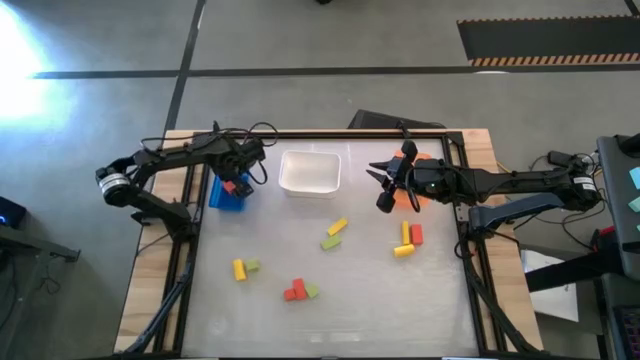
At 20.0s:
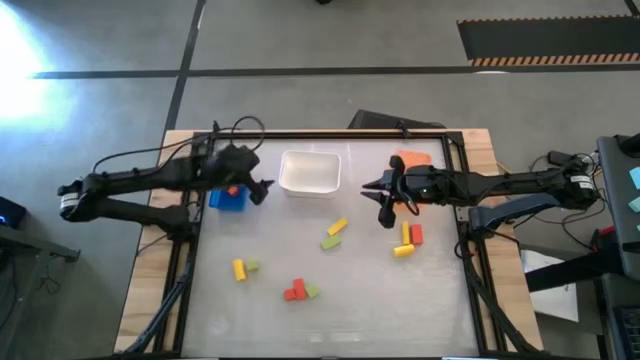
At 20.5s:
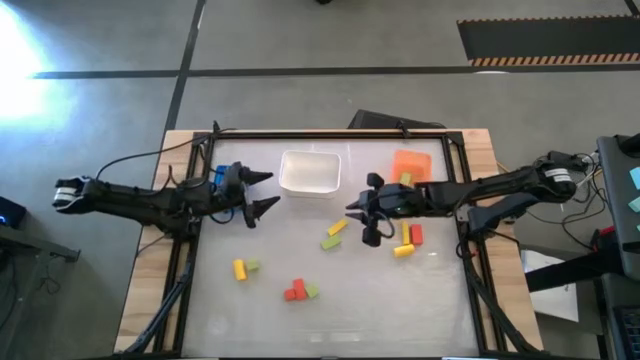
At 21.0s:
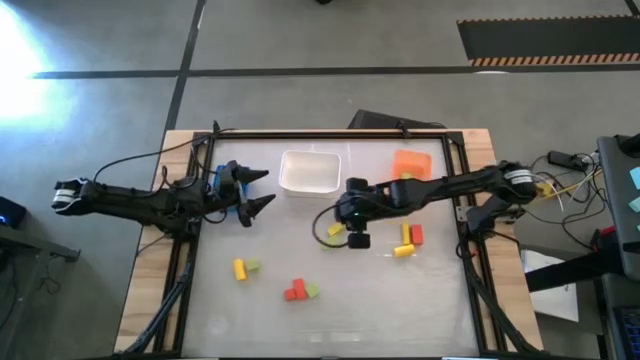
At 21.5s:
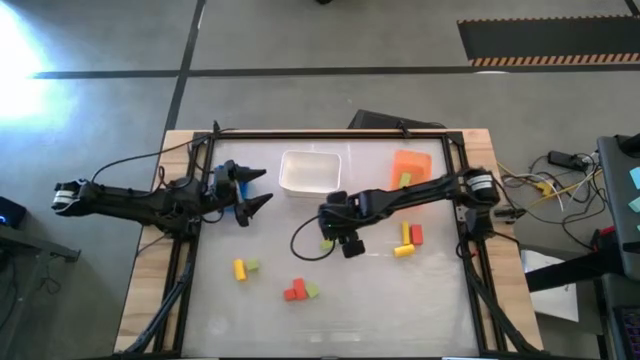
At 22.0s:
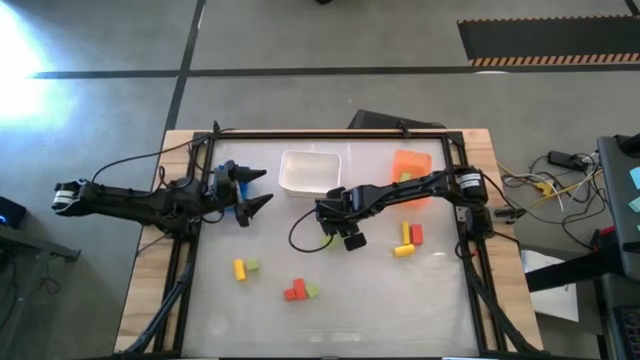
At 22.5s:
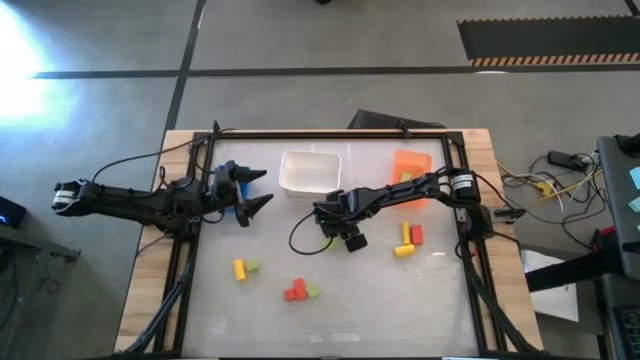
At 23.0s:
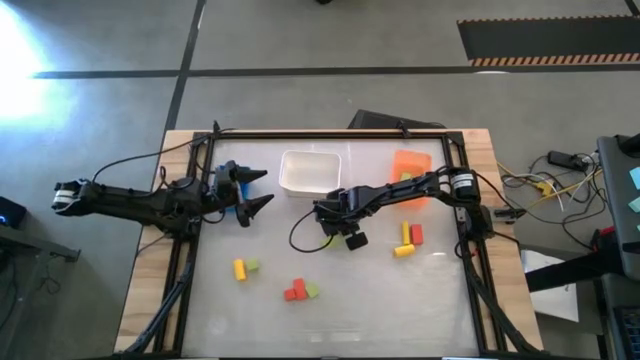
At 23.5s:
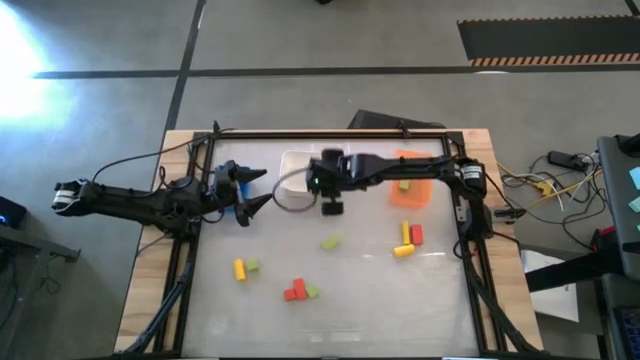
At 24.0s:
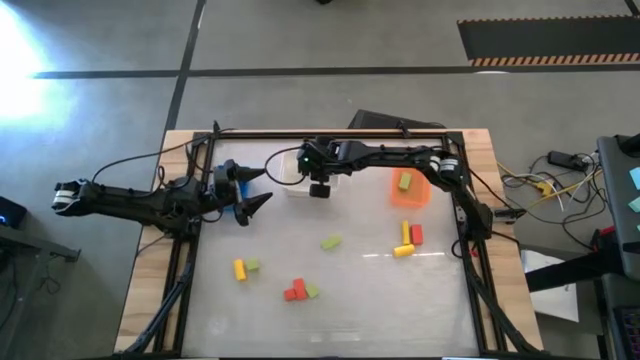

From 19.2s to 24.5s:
Task: Sort & place blocks by color
Put the top center yellow block into the white bin

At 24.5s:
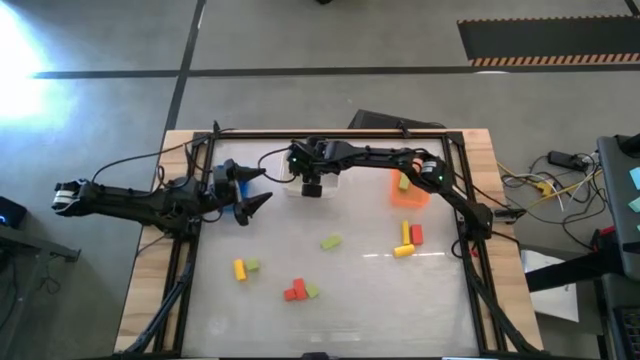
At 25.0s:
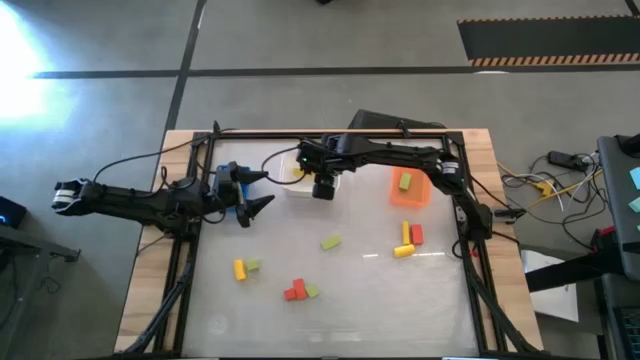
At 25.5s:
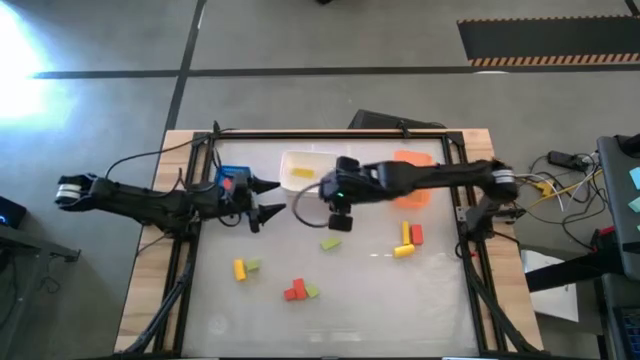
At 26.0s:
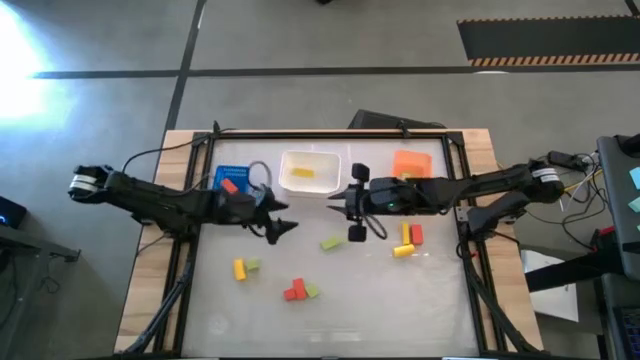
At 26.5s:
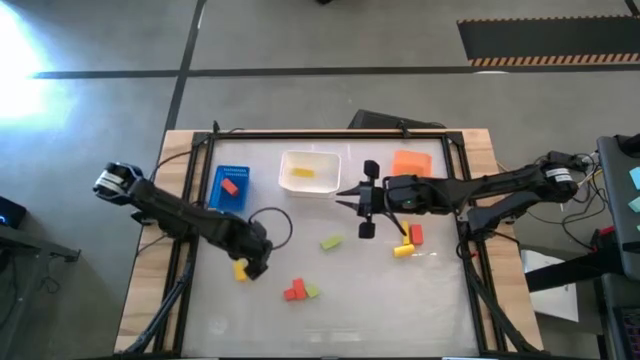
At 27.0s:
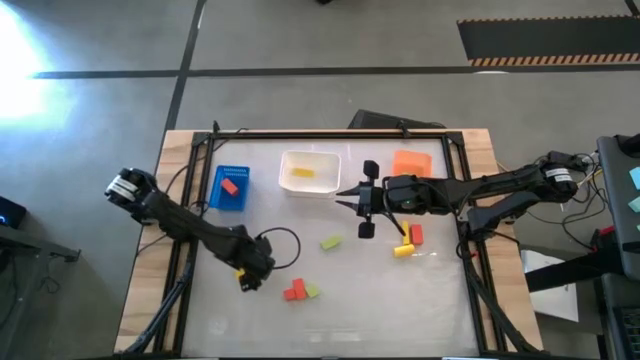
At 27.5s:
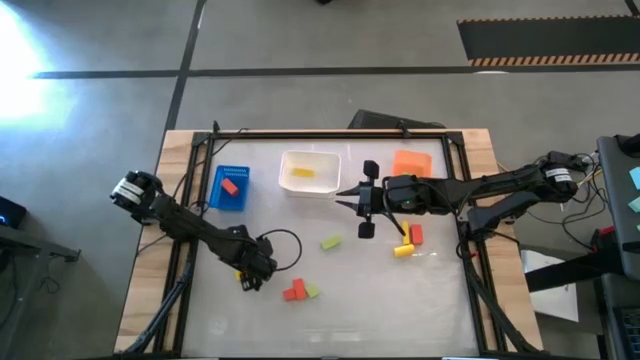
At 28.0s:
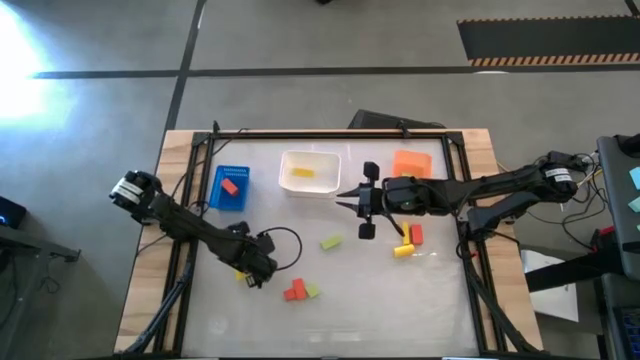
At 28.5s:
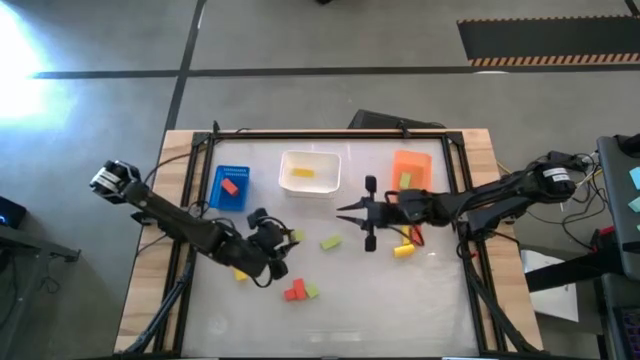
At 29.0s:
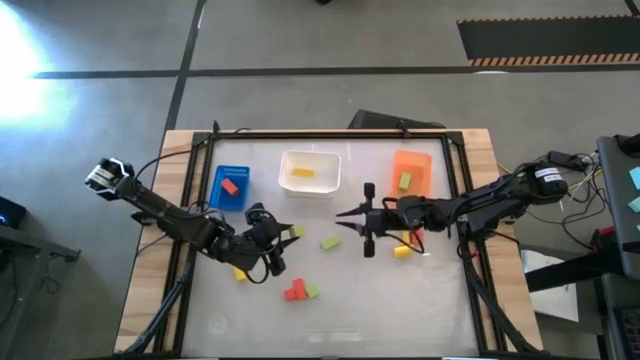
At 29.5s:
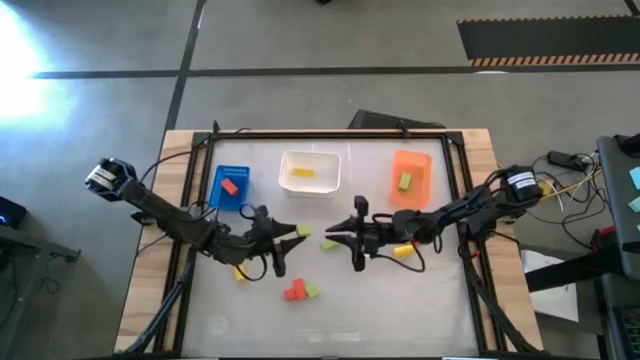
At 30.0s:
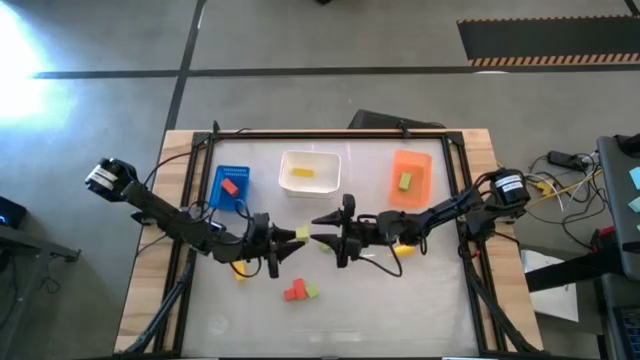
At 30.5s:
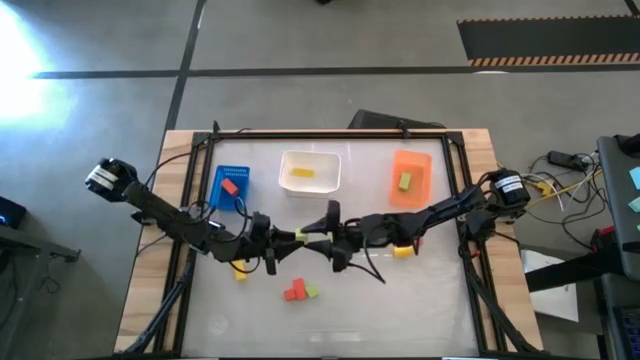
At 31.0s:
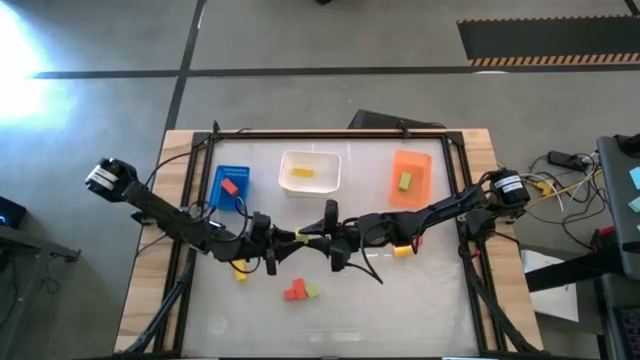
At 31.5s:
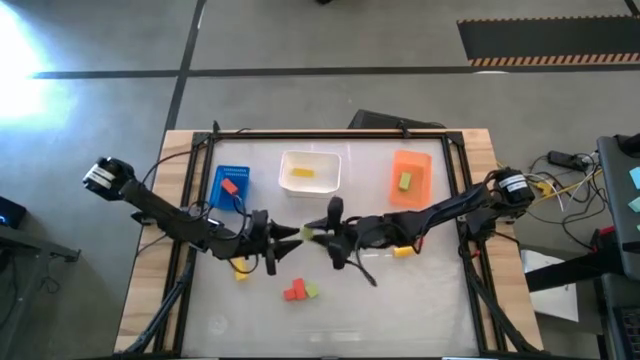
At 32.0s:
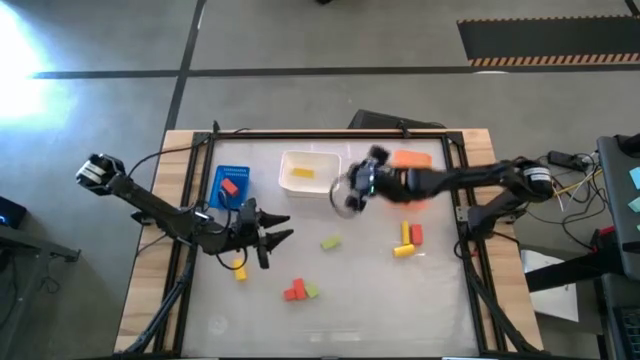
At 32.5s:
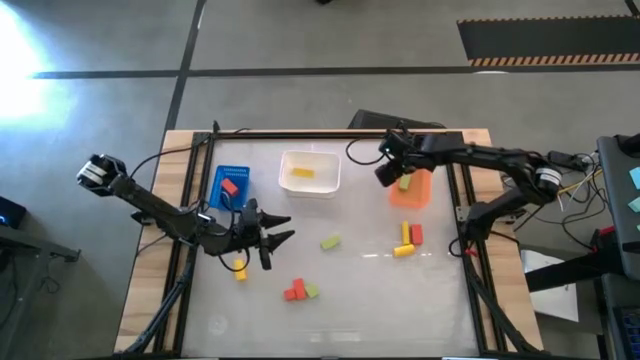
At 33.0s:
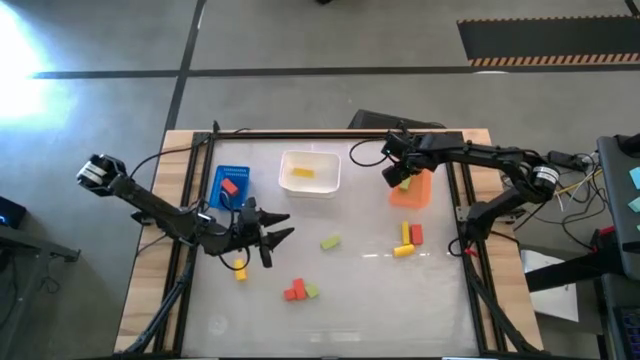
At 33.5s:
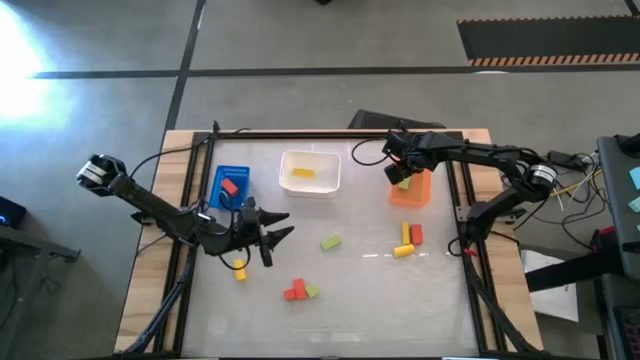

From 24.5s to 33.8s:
Put the middle left green block into the orange bin

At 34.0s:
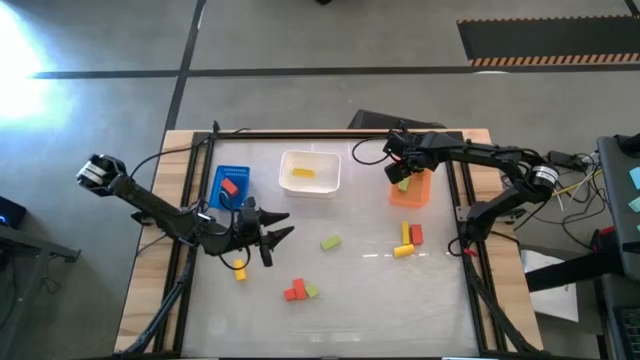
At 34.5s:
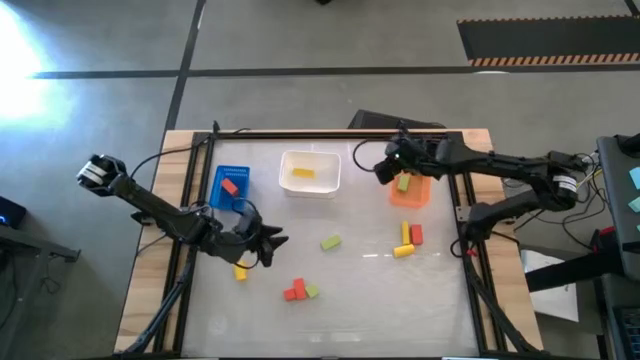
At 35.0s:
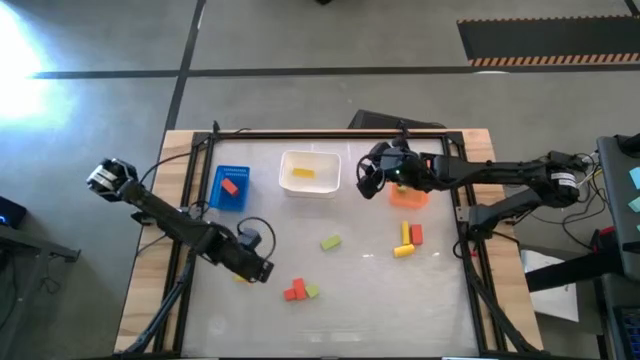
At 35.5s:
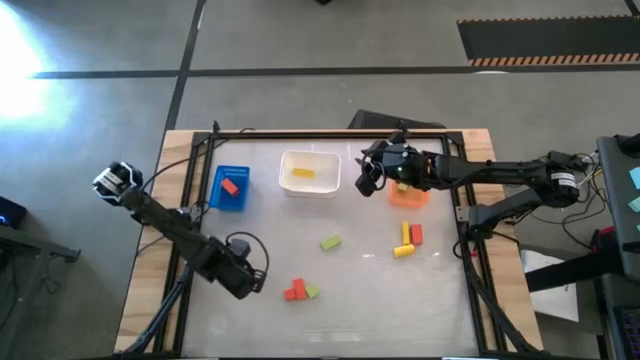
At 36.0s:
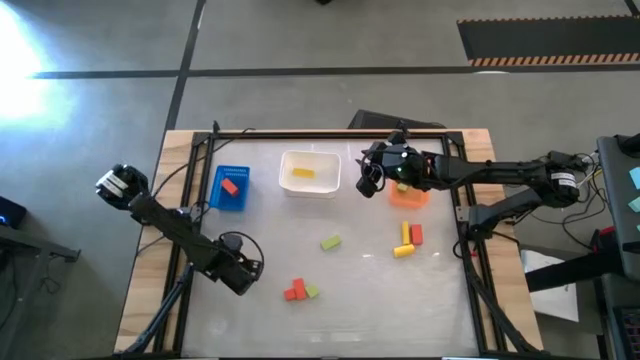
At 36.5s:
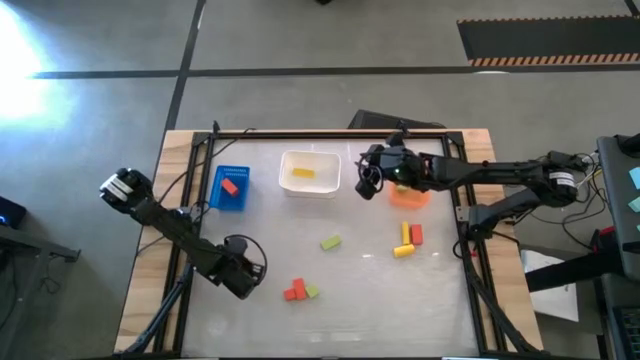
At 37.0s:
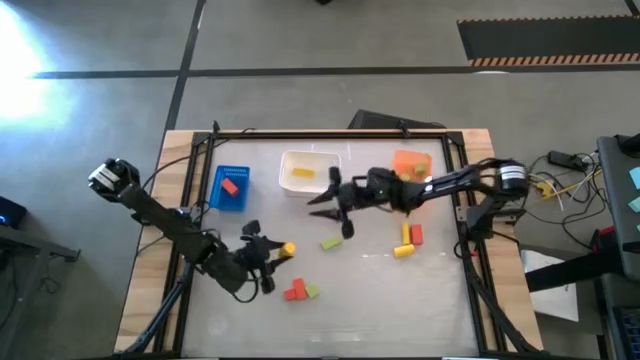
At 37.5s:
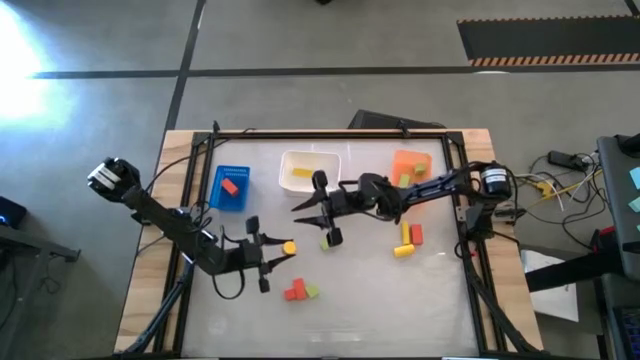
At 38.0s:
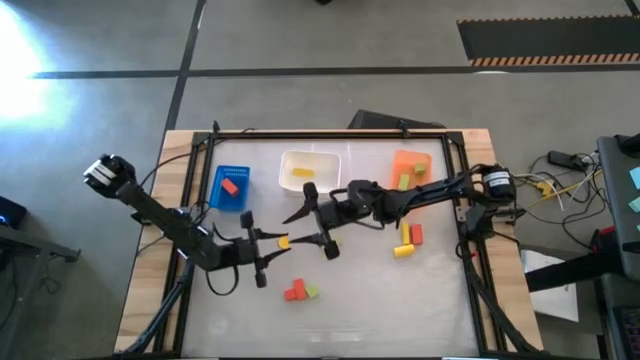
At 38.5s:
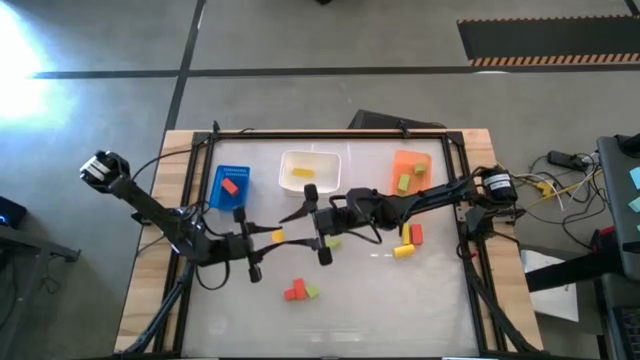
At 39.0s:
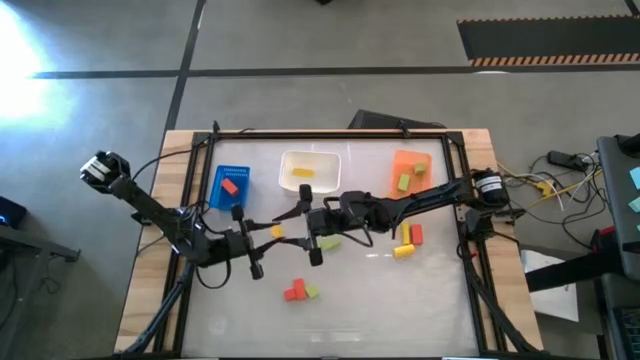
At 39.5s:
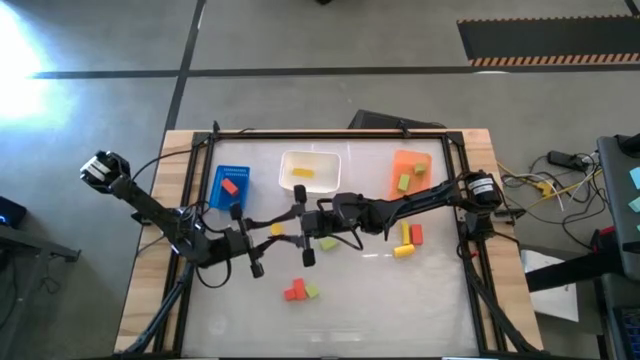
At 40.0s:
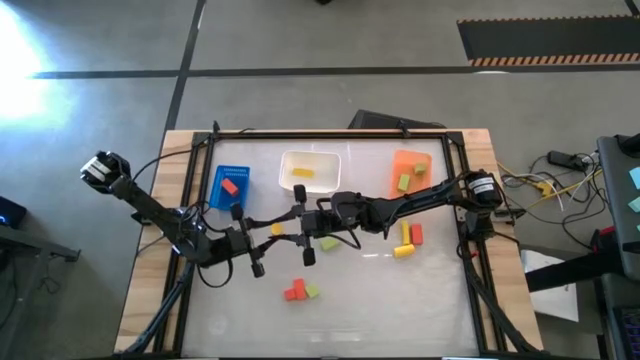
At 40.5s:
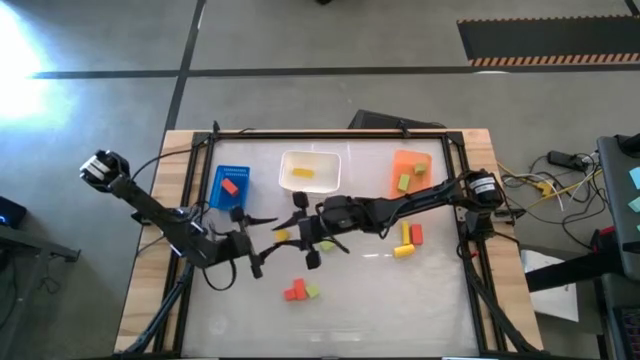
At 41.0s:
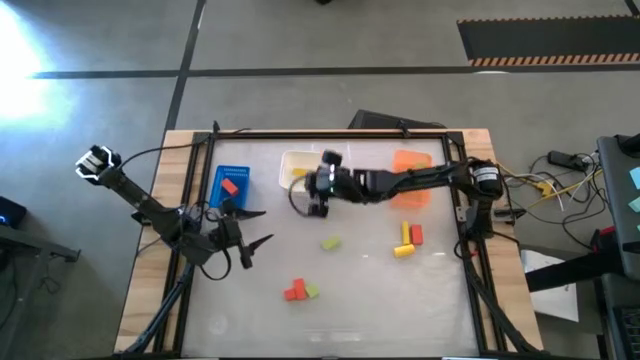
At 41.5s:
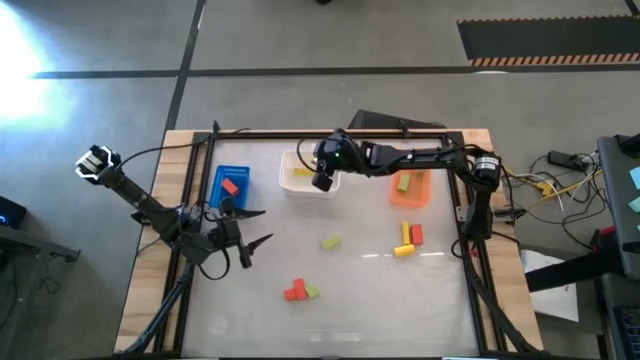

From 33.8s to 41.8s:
Put the bottom left yellow block into the white bin
